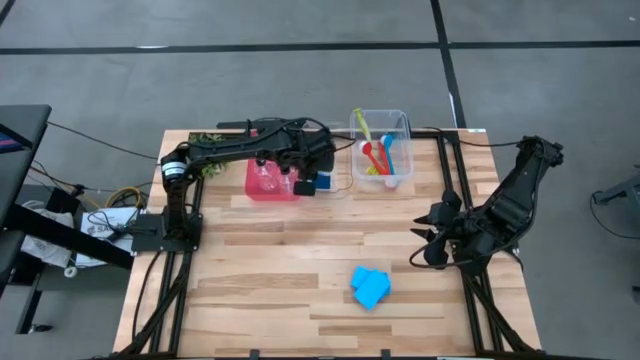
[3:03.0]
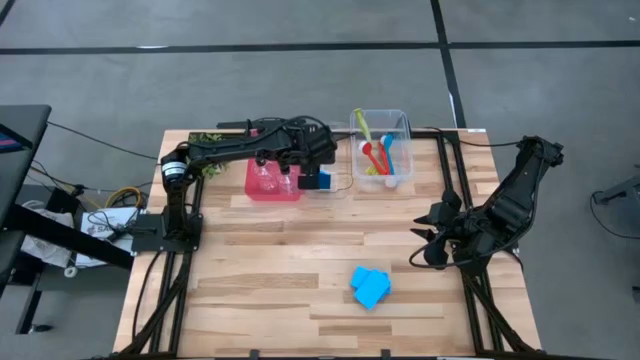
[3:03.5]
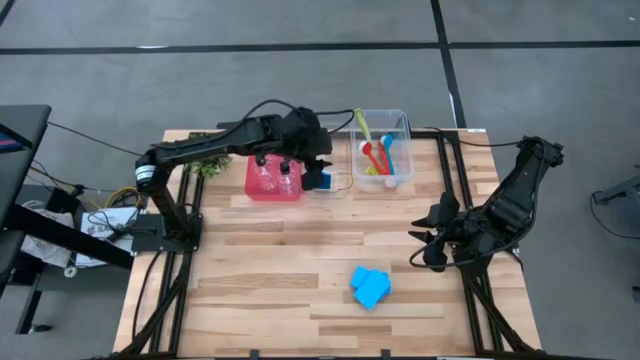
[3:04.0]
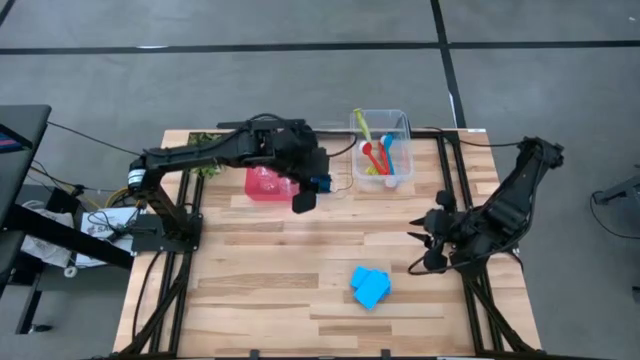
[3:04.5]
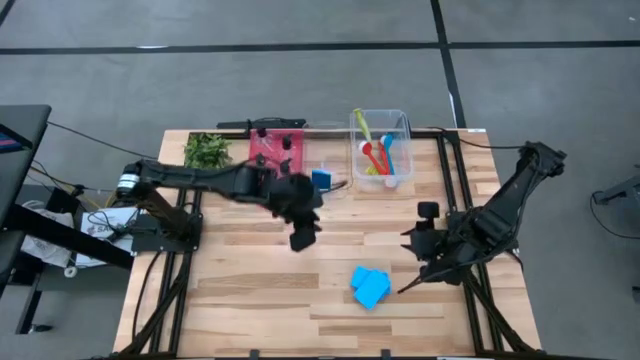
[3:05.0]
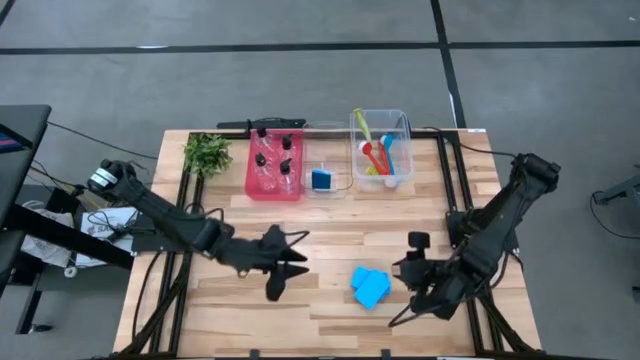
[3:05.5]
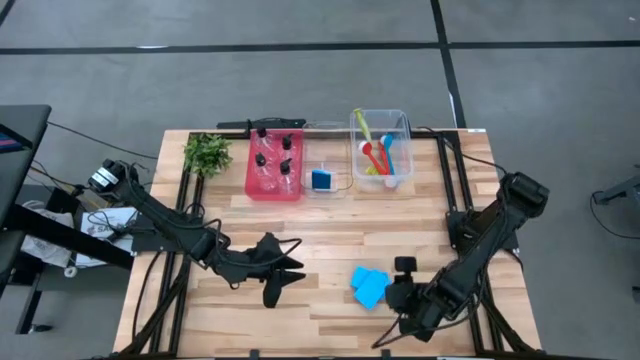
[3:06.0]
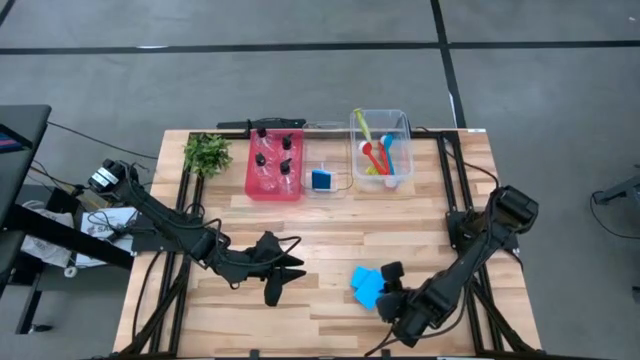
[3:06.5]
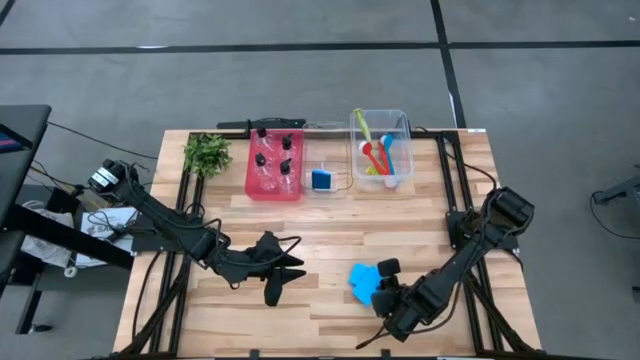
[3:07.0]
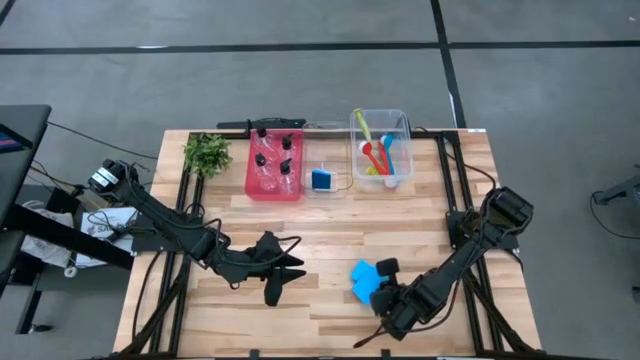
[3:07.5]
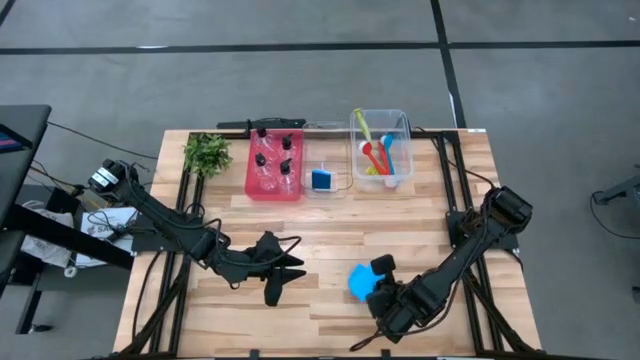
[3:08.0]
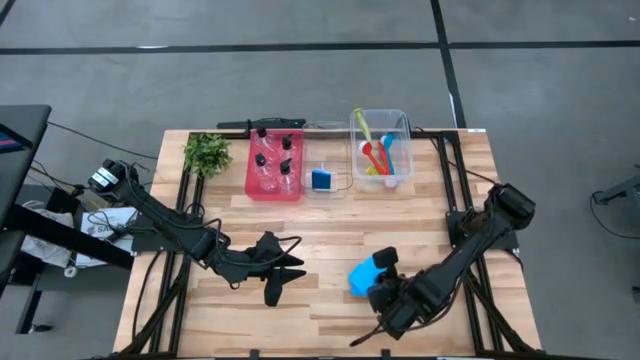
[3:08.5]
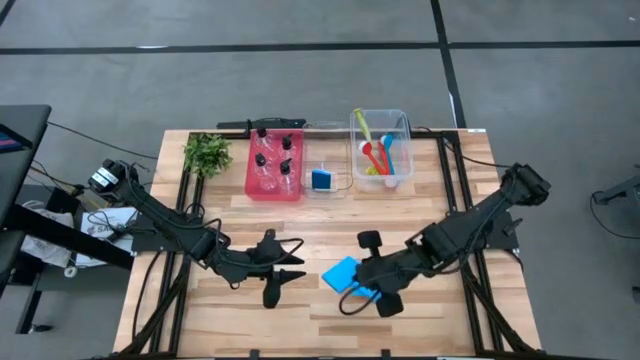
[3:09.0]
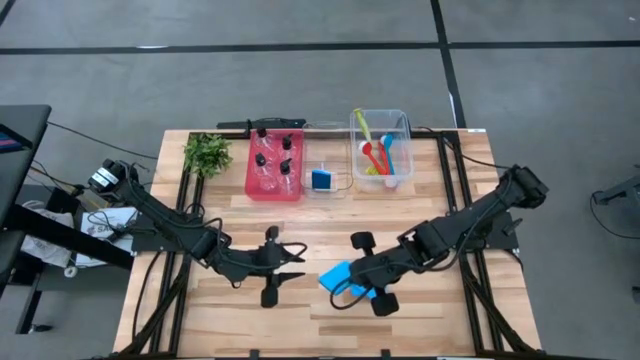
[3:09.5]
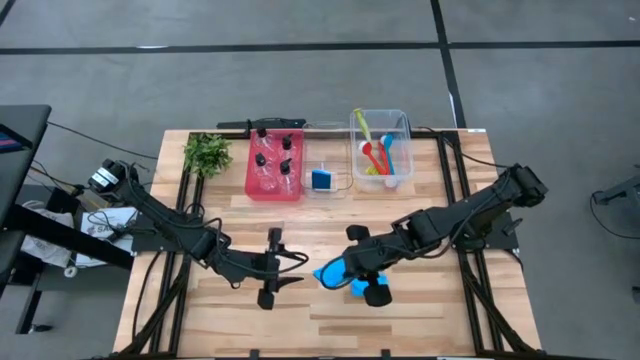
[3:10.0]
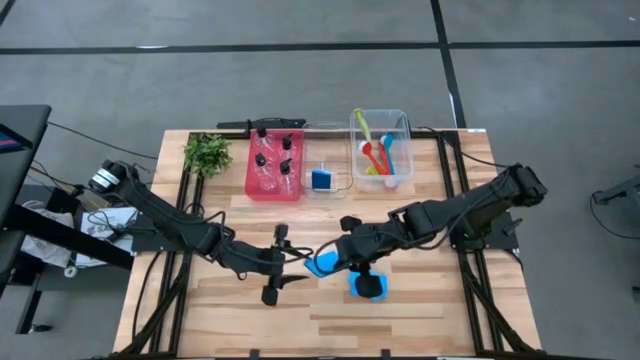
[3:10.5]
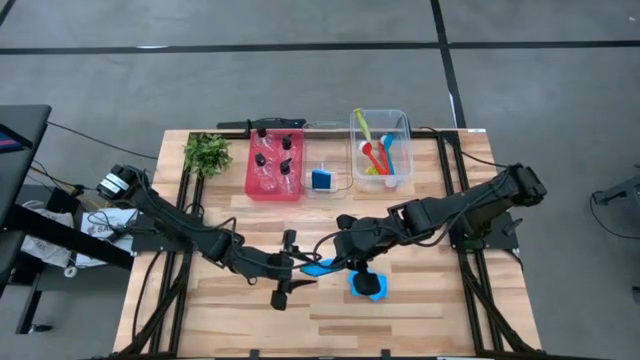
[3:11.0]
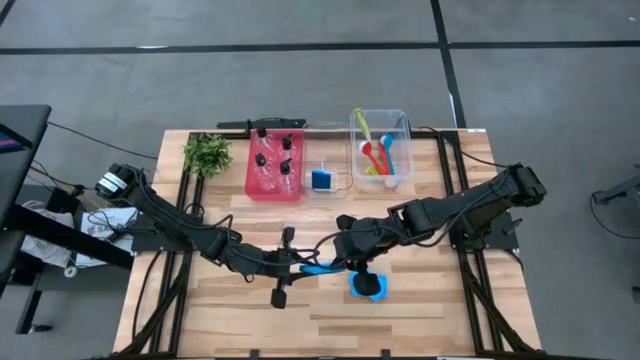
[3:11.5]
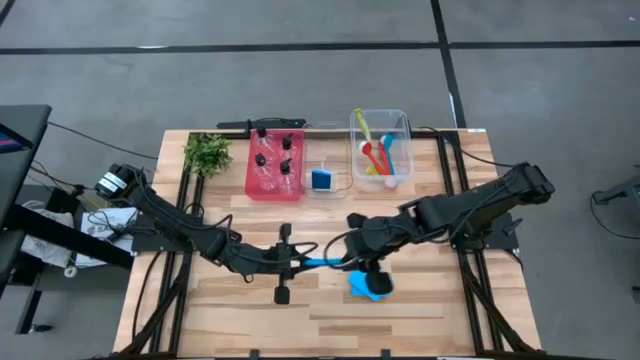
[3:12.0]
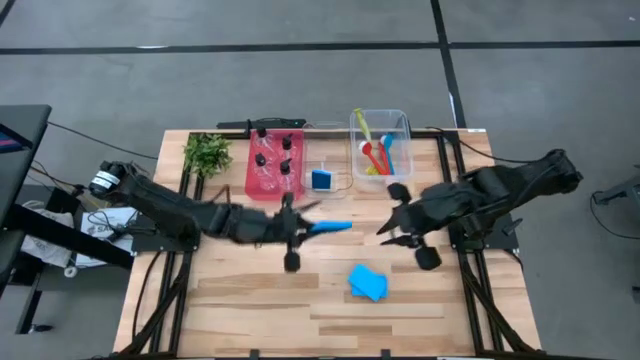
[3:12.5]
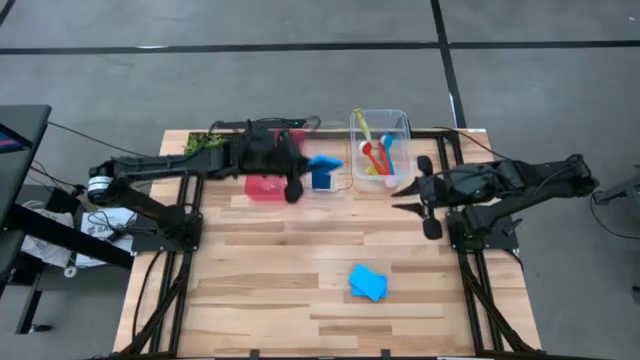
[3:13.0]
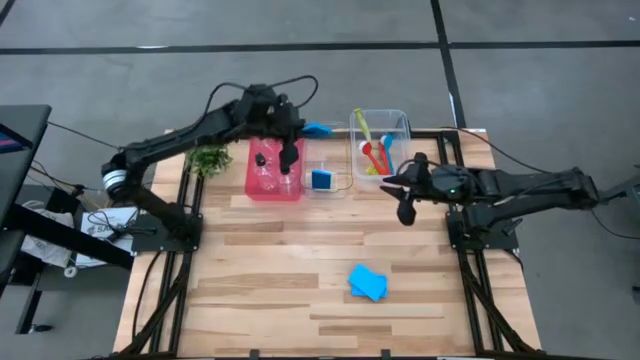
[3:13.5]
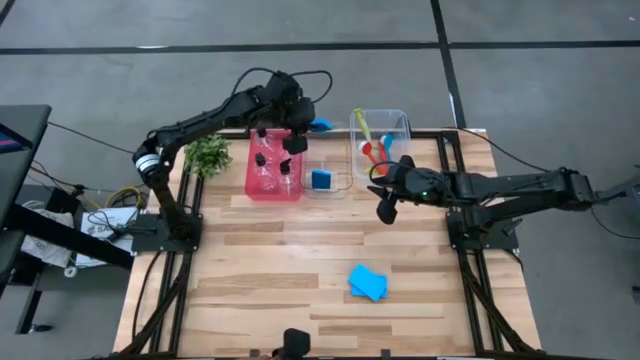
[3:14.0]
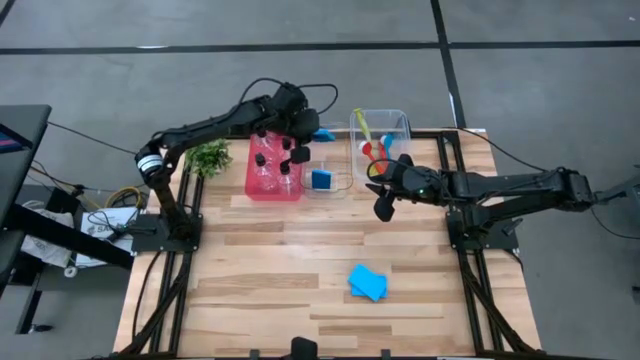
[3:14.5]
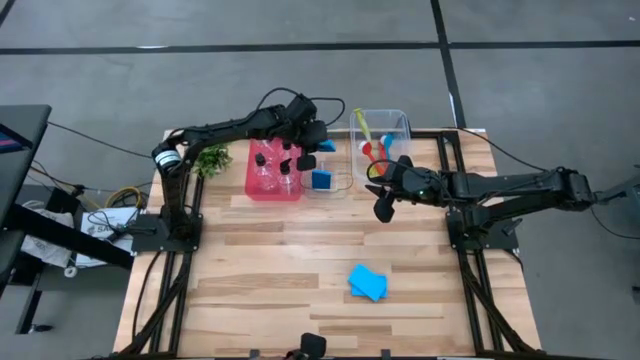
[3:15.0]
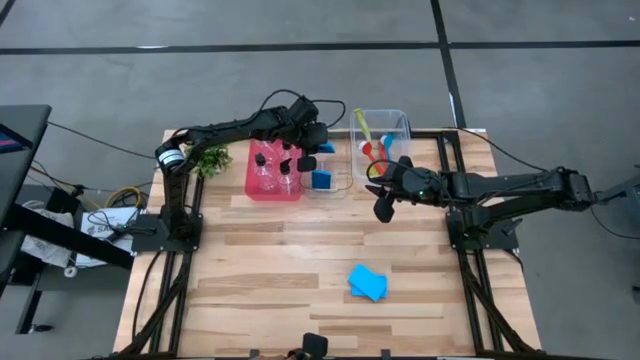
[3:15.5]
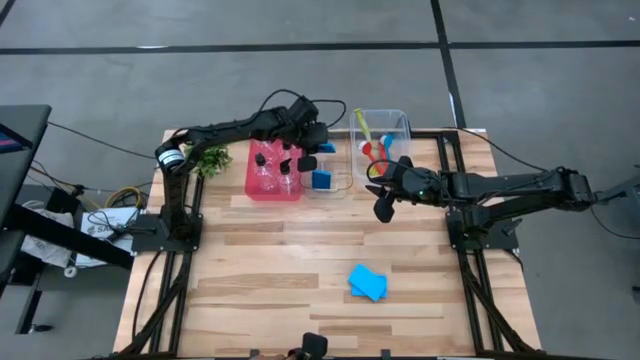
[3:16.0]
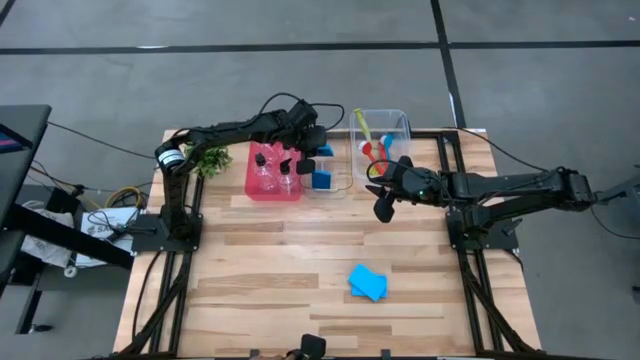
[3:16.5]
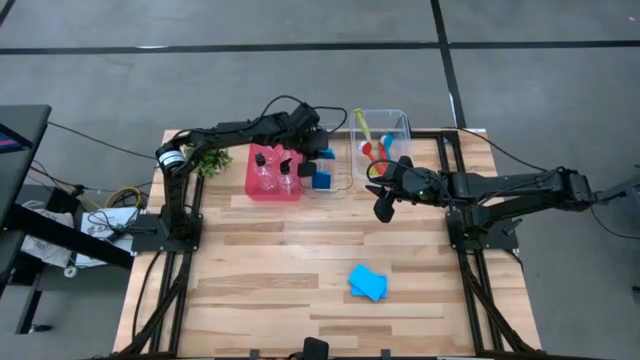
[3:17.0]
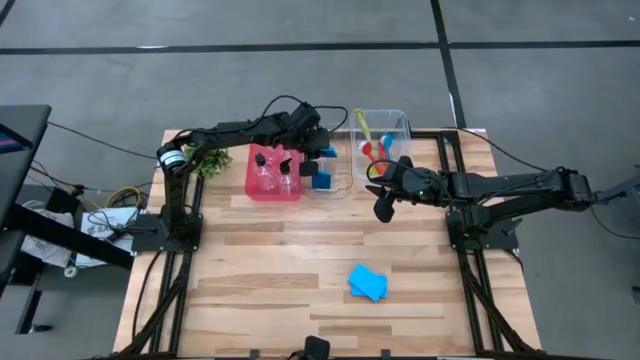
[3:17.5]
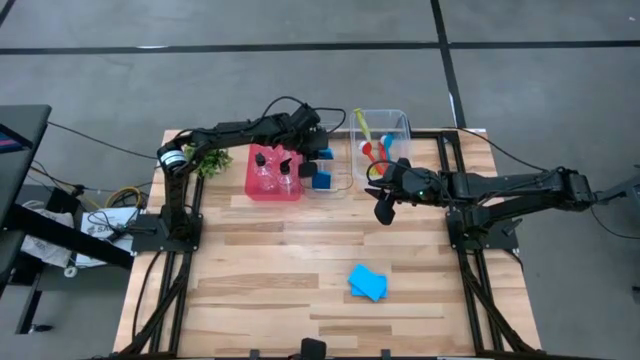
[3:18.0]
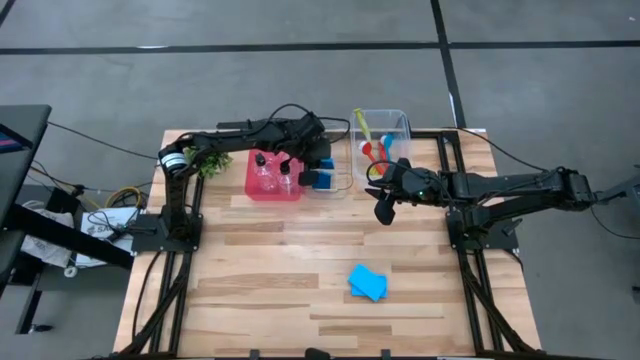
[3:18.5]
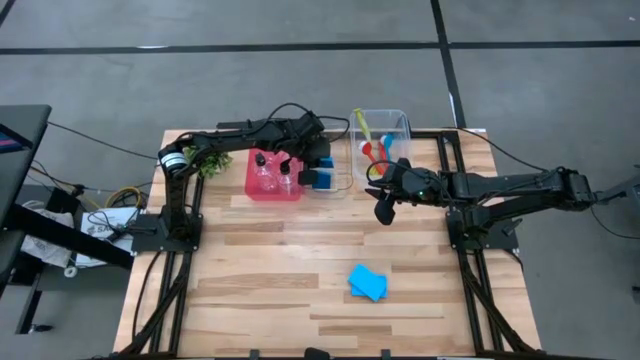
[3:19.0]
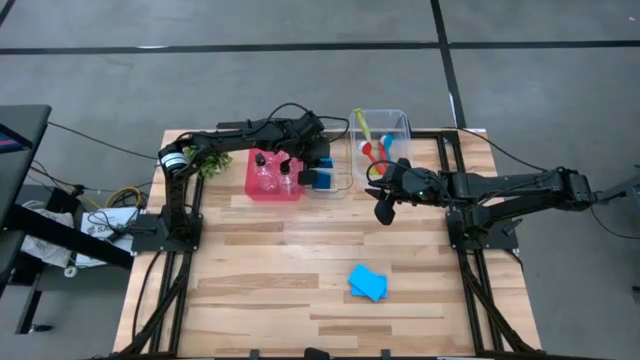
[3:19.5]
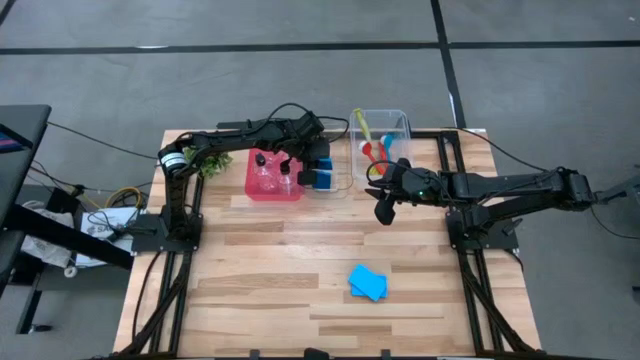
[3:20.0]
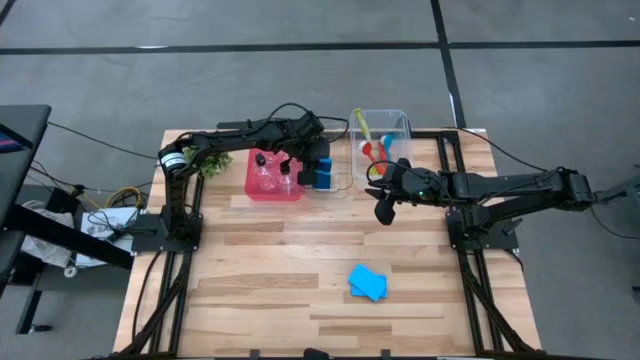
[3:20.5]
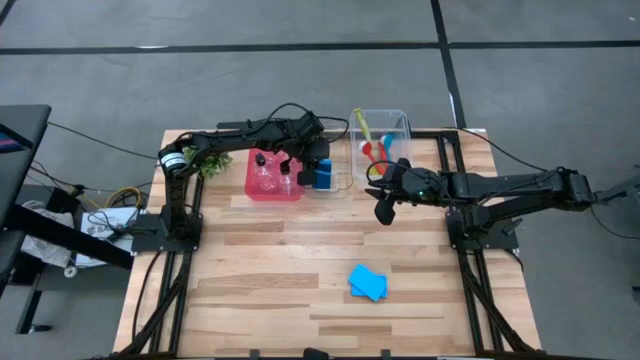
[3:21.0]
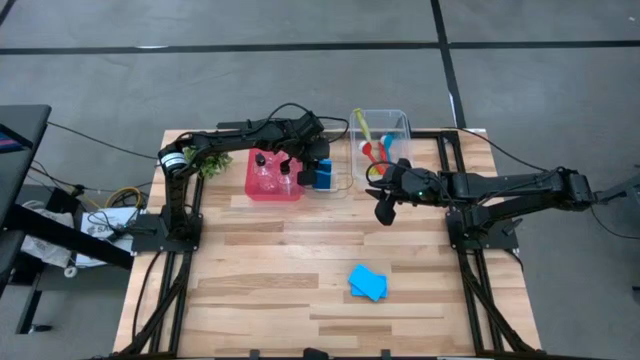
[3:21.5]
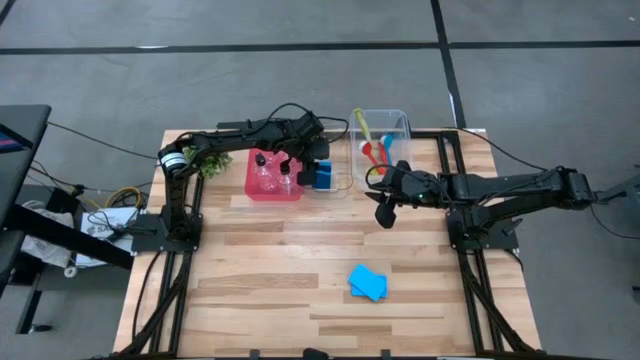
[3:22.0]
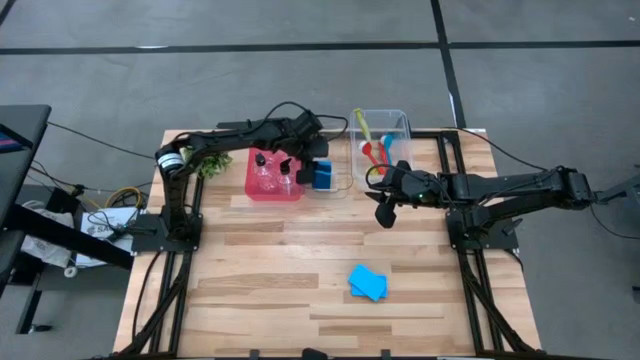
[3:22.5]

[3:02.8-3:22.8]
Task: Pick & Place Kitchen Sink Supplies
Put the blue sponge into the transparent bin

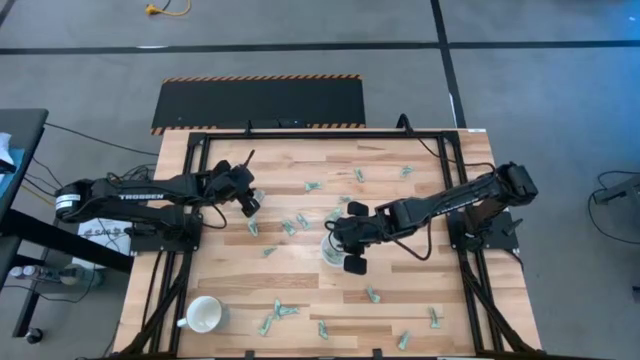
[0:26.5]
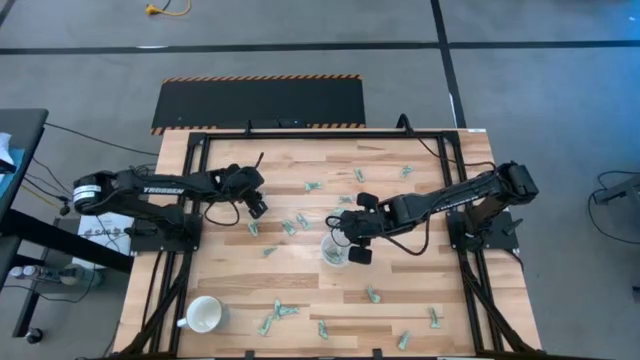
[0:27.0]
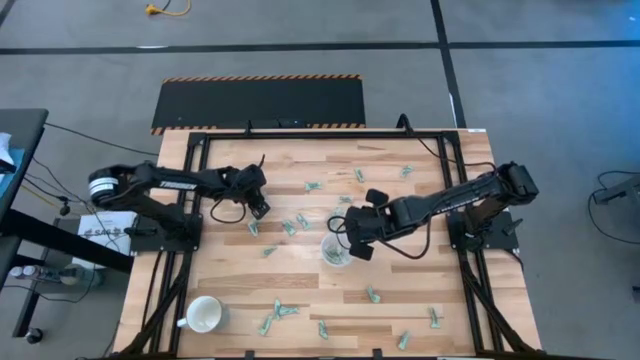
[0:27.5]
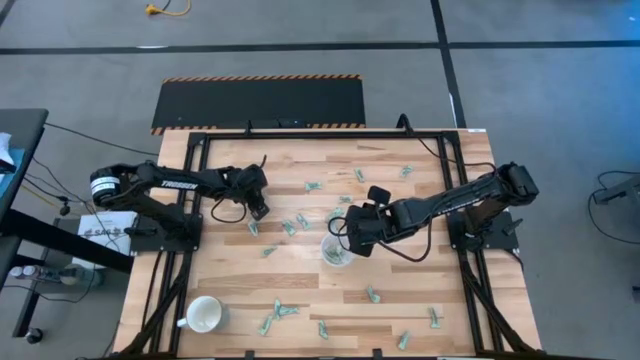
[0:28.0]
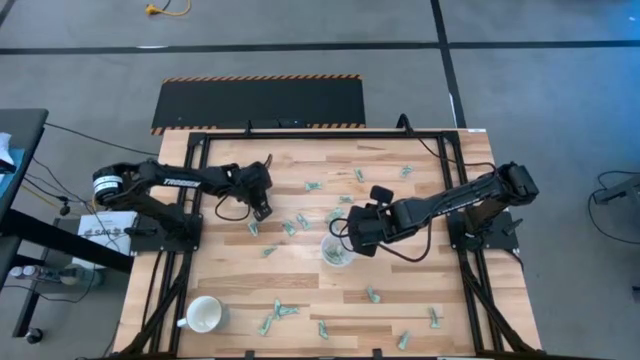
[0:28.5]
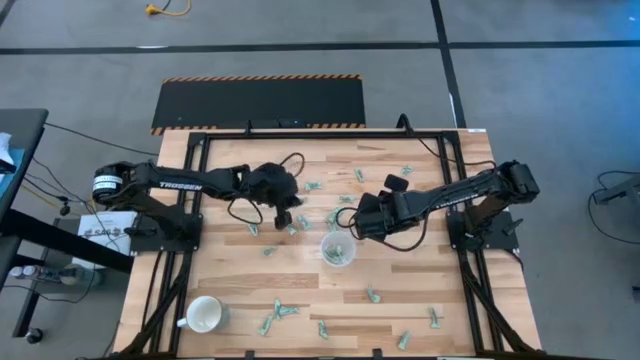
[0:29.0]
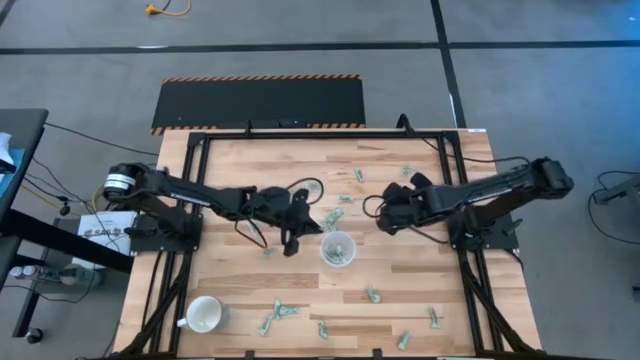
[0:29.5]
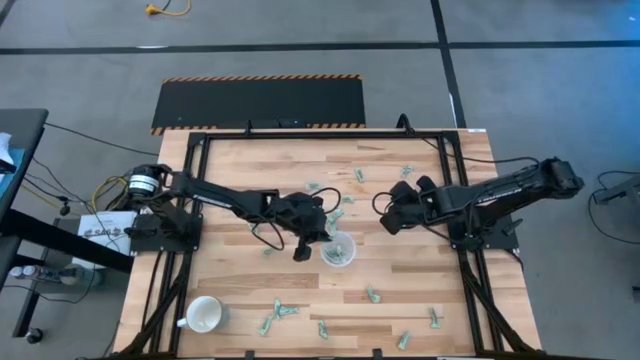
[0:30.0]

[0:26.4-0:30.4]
Task: Pick and place Stevia / Truvia into bins
Put the stevia packet into the transparent container
